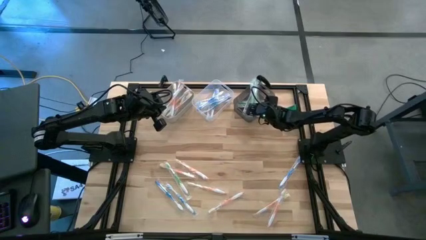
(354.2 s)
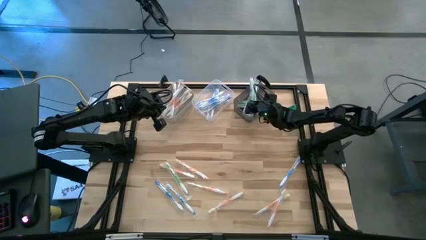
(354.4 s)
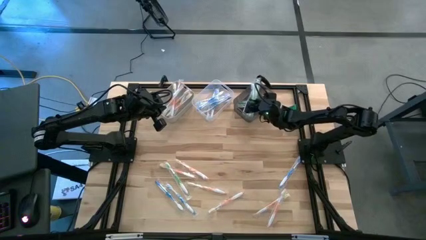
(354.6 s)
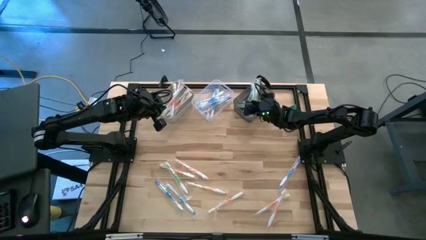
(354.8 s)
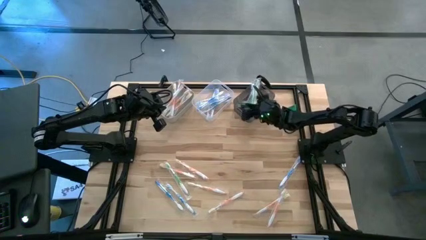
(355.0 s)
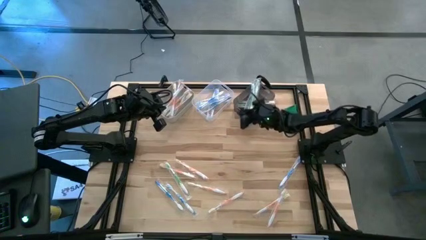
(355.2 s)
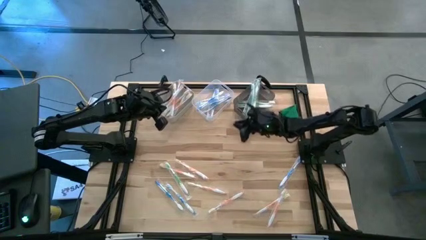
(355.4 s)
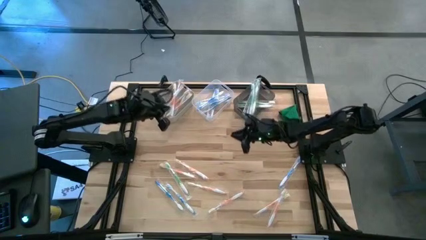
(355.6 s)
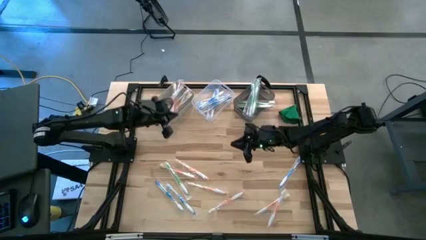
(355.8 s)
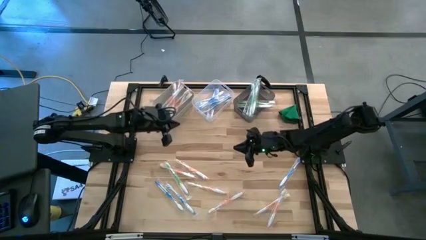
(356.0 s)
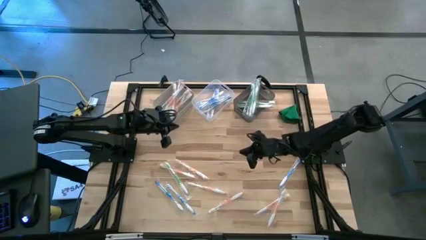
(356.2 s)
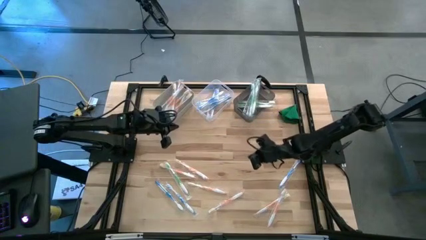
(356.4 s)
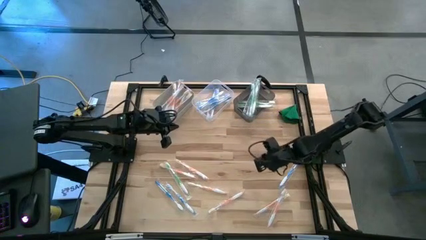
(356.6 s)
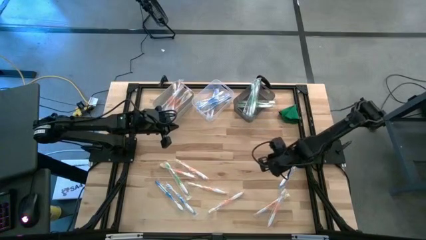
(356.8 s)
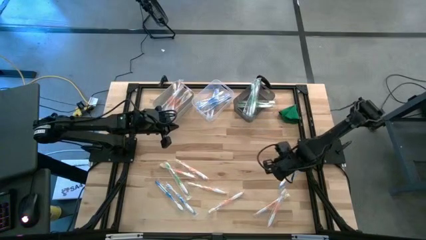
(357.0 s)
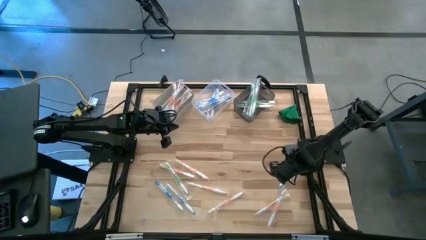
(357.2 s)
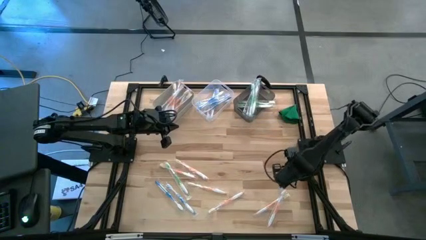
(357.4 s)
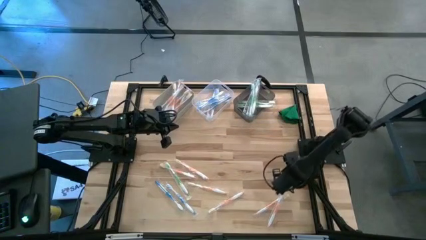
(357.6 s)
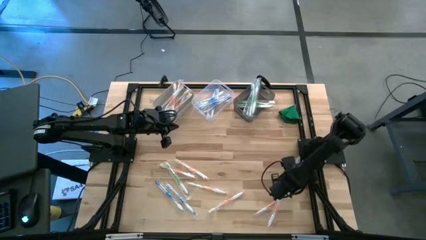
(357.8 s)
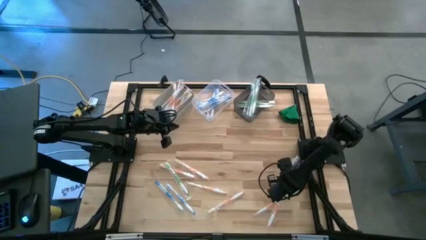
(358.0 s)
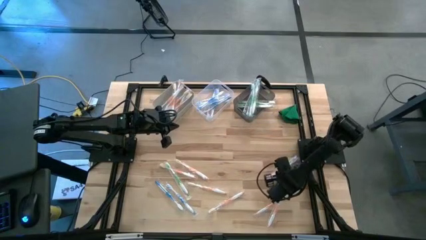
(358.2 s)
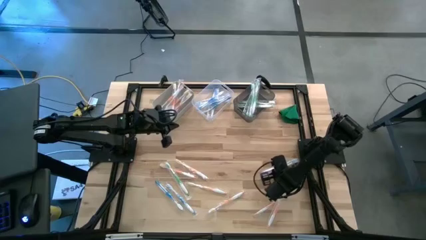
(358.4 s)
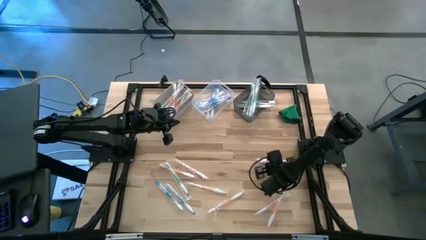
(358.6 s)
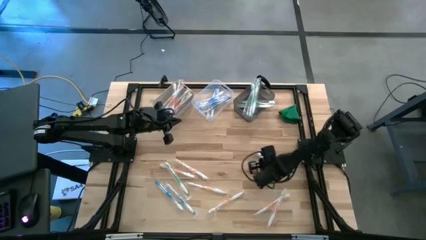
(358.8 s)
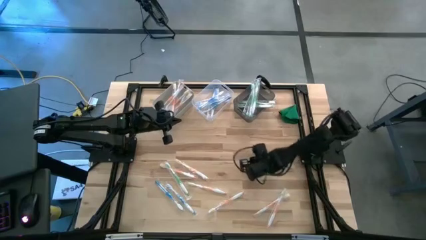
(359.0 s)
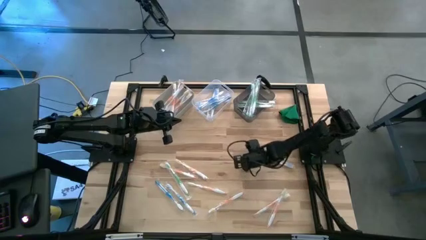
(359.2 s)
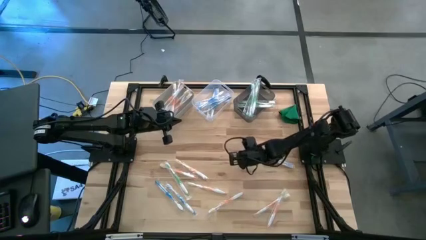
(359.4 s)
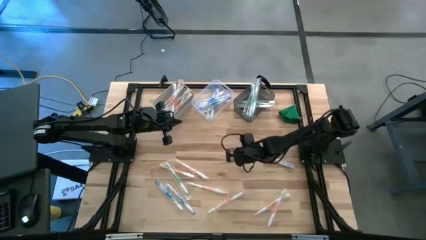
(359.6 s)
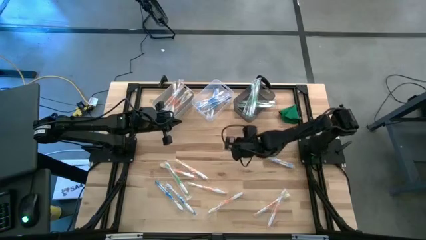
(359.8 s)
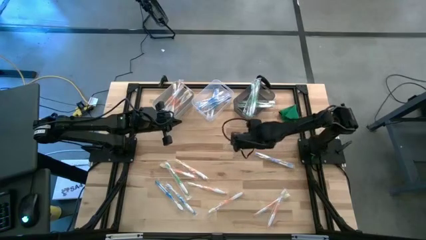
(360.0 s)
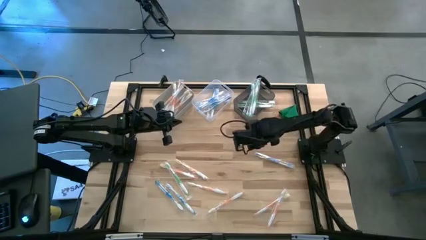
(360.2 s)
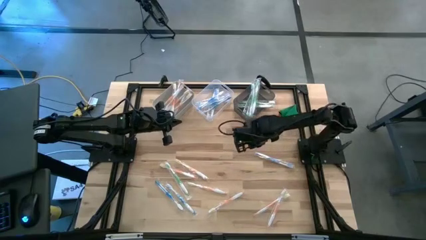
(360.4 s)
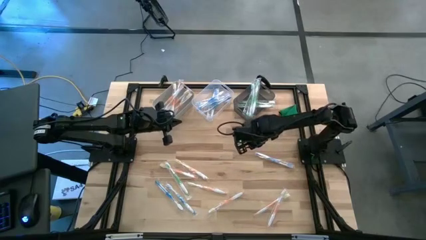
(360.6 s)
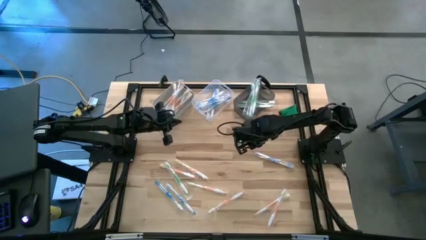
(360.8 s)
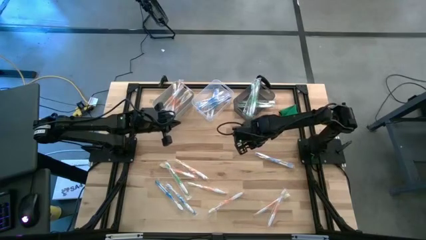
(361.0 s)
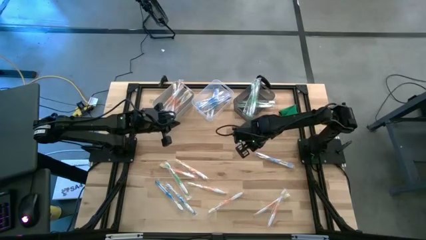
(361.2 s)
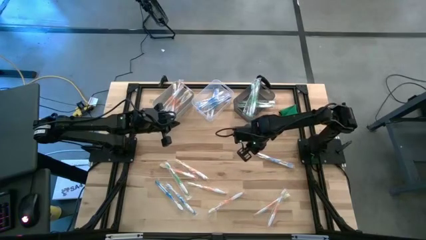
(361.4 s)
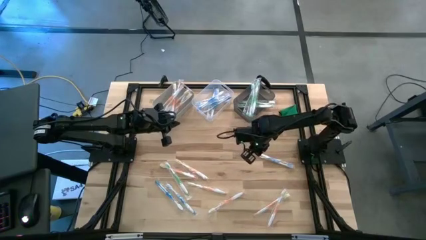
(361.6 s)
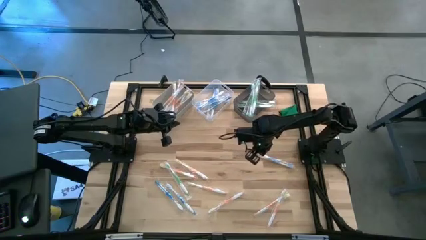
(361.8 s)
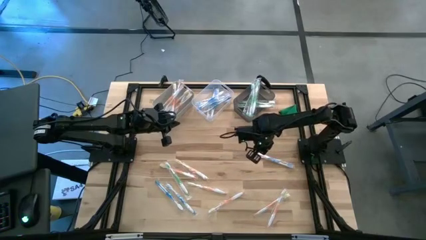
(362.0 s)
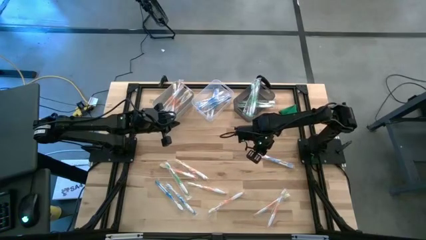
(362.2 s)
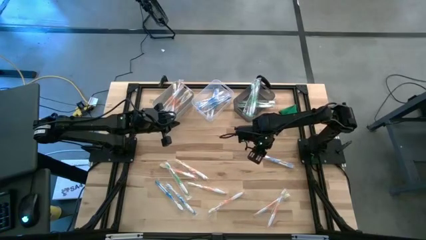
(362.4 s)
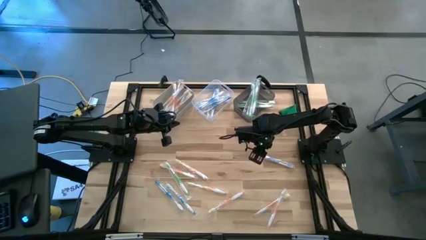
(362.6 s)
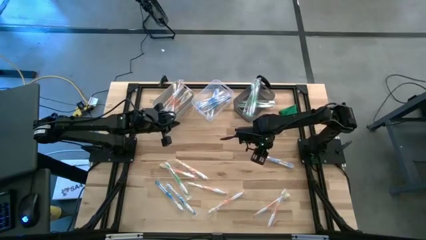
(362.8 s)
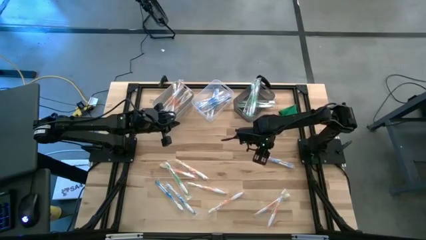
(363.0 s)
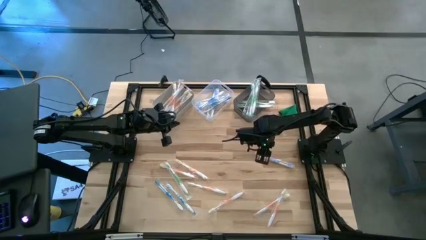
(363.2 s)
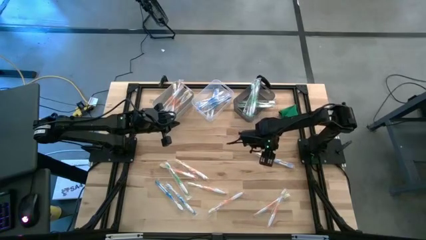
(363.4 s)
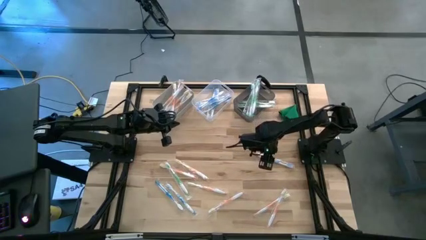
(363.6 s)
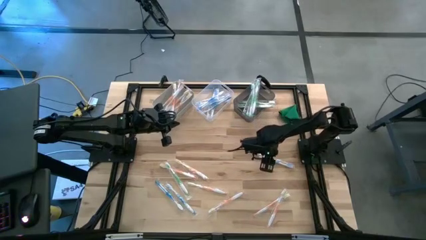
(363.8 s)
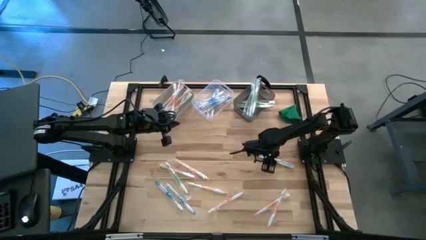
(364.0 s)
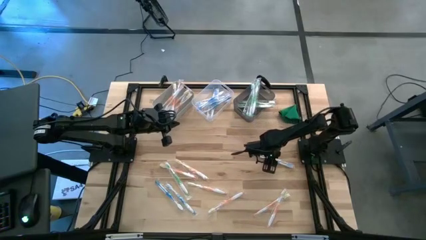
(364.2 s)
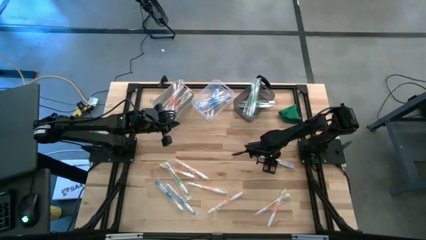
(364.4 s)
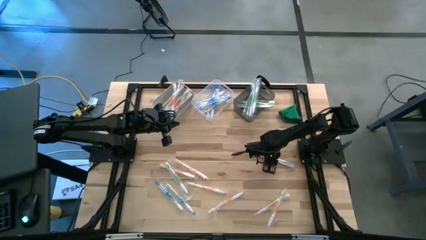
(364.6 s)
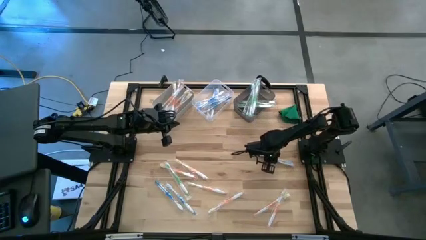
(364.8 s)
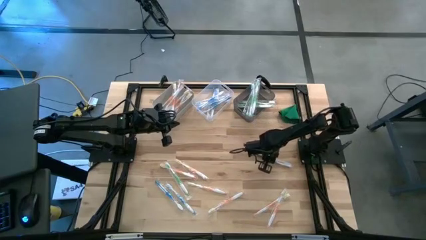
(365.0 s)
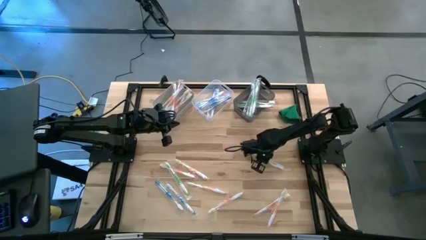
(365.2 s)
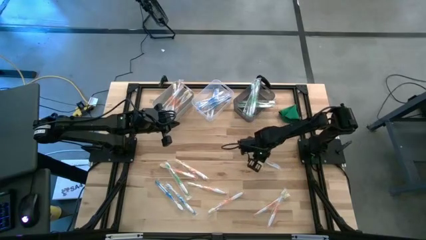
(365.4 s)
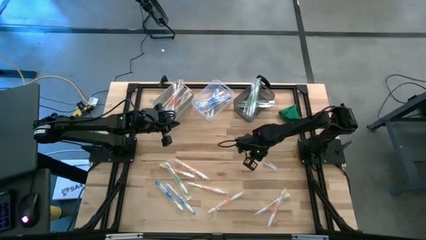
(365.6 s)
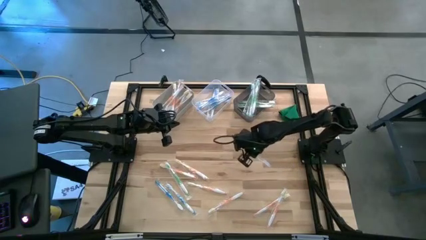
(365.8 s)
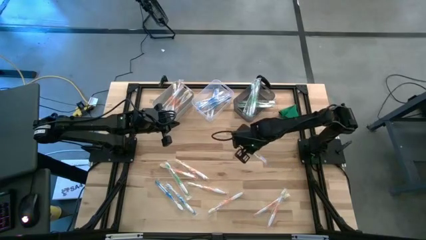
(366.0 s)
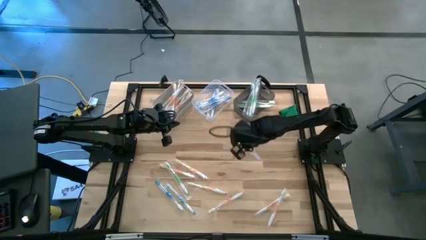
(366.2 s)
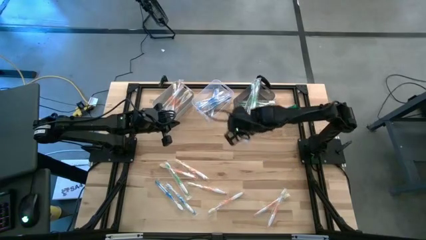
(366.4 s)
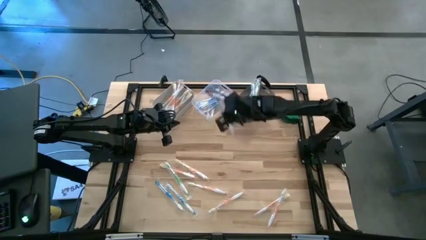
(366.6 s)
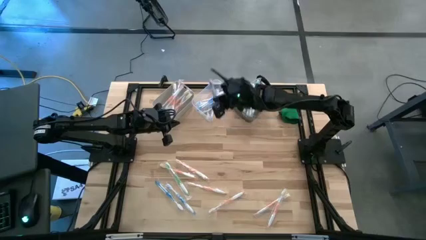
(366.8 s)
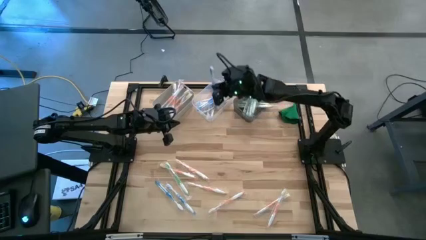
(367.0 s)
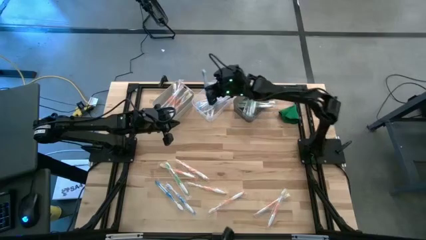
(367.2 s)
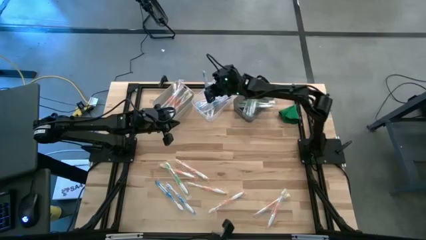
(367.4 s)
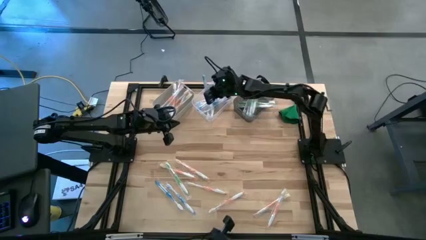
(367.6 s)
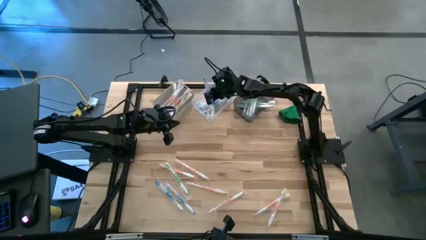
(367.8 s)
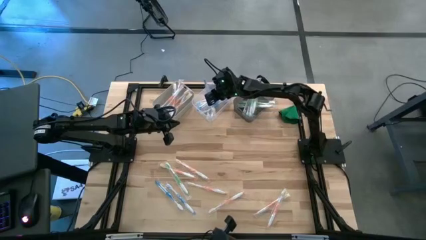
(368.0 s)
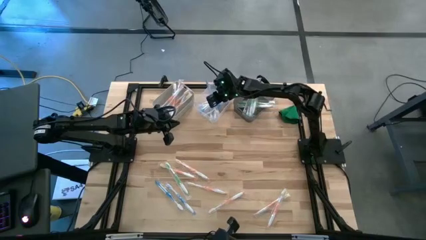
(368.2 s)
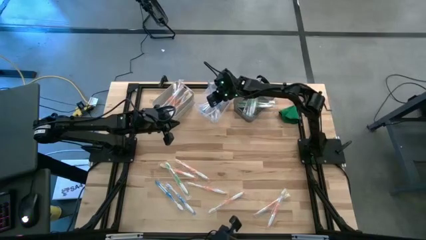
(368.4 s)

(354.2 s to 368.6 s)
Task: Pick & Place Toothbrushes
Put the blue toothbrush into the transparent bin

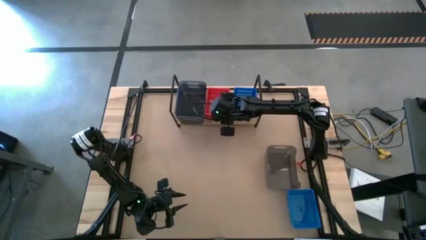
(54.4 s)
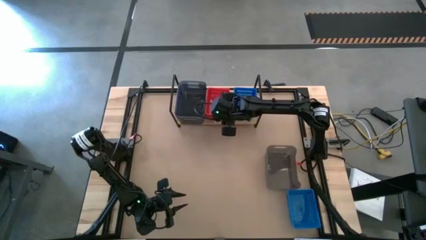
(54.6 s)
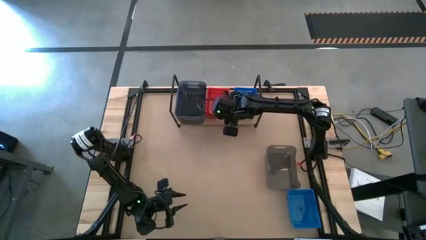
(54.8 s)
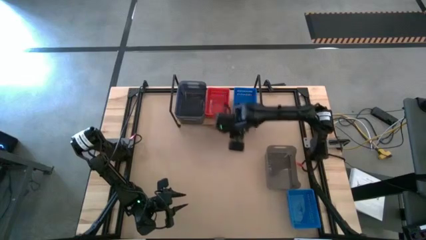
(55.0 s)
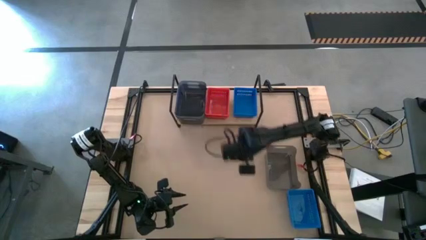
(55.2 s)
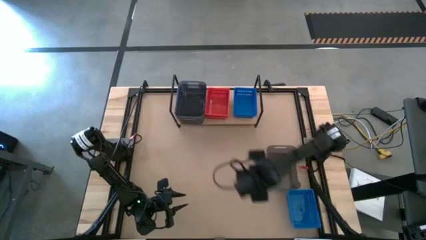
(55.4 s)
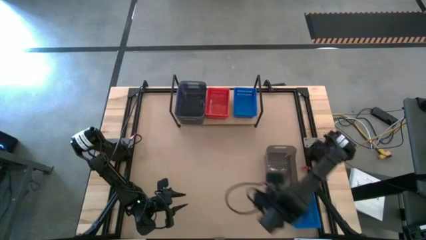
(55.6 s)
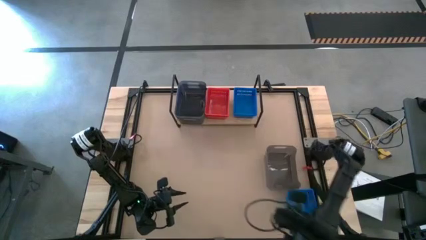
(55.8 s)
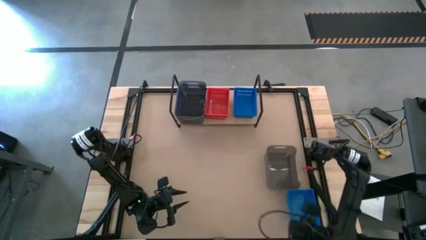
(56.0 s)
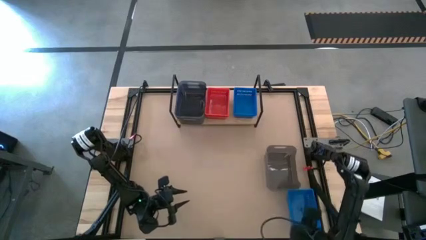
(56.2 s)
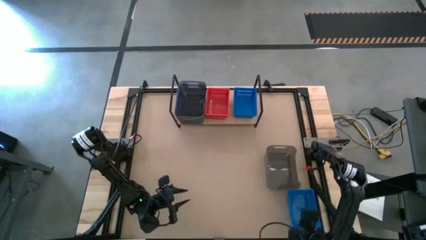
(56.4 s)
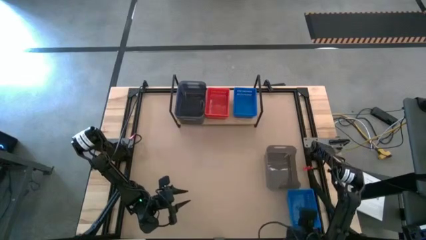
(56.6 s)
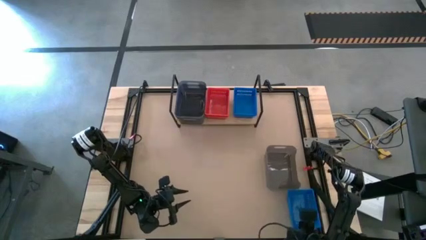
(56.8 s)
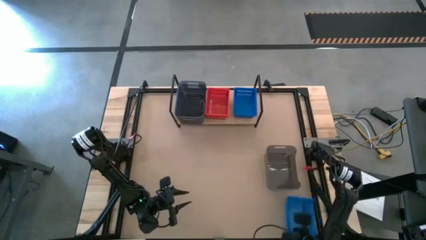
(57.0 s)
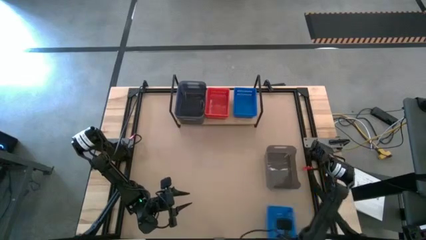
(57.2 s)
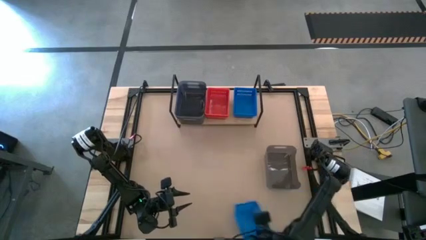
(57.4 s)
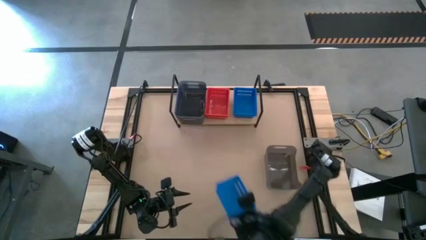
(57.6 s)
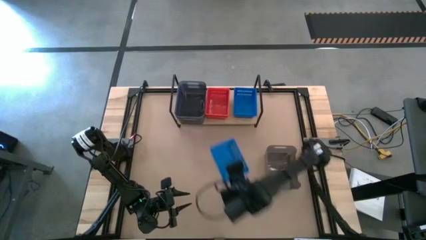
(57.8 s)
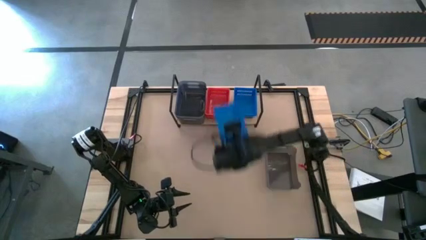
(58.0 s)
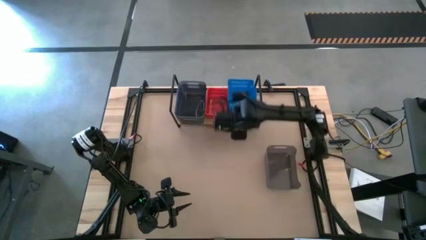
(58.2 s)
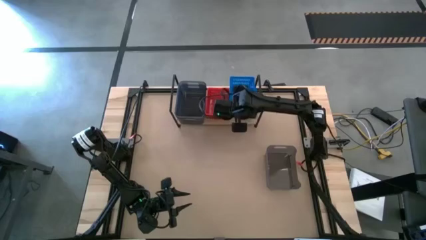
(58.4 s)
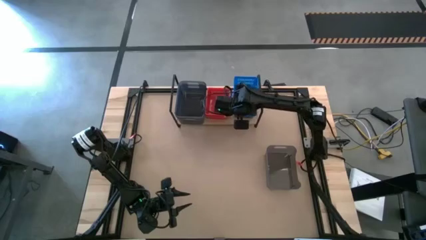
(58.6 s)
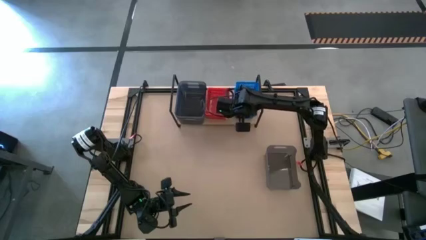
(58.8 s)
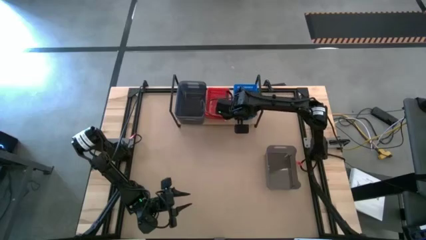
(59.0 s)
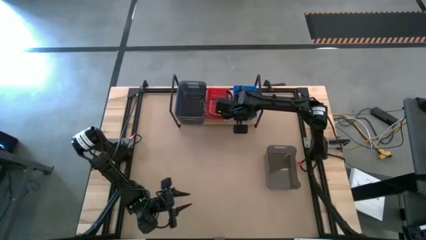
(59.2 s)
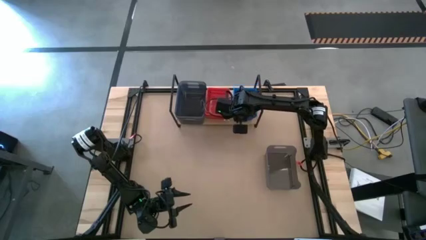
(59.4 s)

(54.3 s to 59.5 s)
Task: Stack baskets on shelf by color
Stack the blue bin on the other blue bins on the shelf
